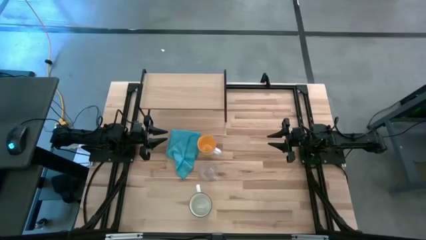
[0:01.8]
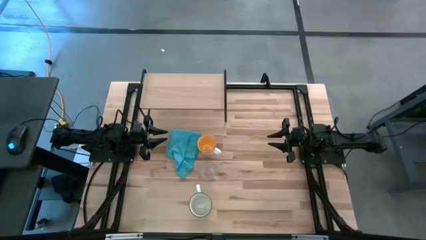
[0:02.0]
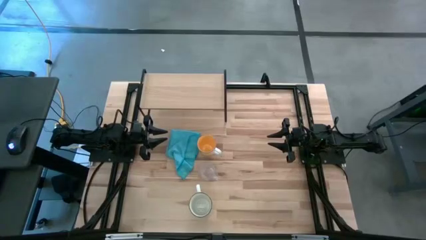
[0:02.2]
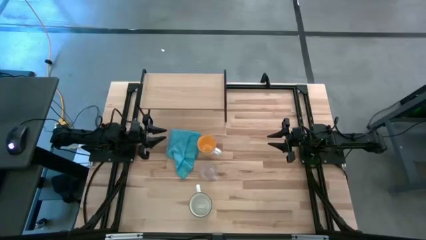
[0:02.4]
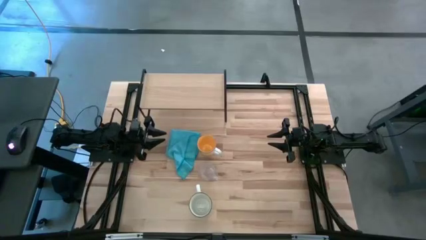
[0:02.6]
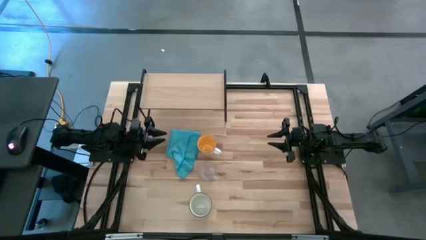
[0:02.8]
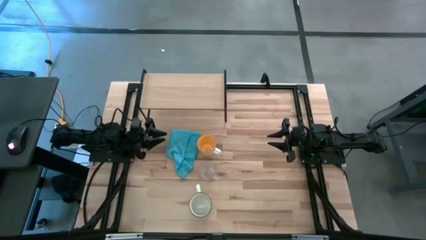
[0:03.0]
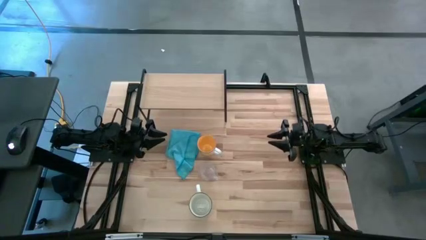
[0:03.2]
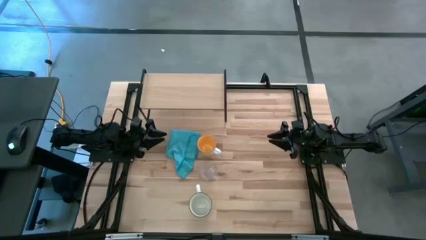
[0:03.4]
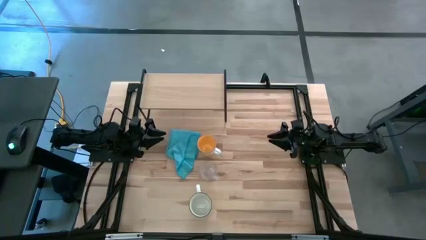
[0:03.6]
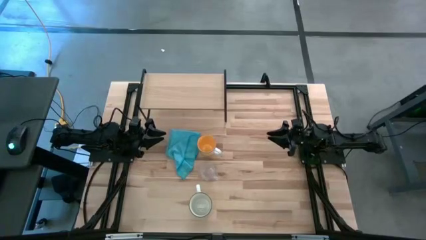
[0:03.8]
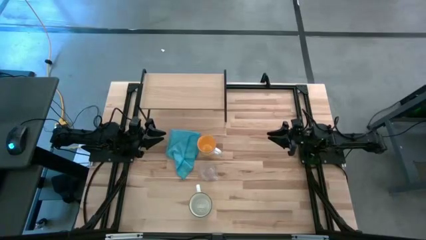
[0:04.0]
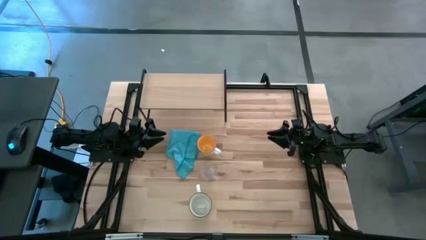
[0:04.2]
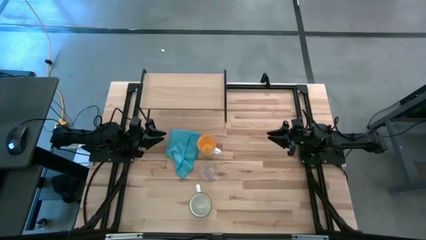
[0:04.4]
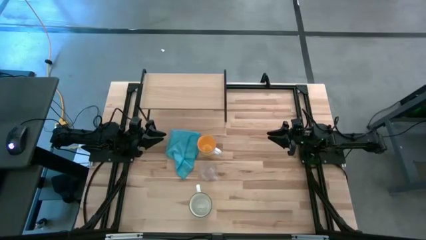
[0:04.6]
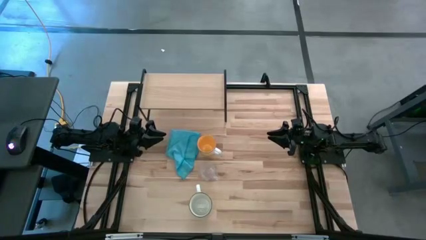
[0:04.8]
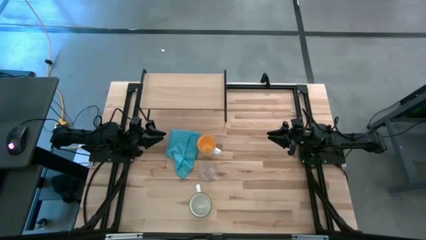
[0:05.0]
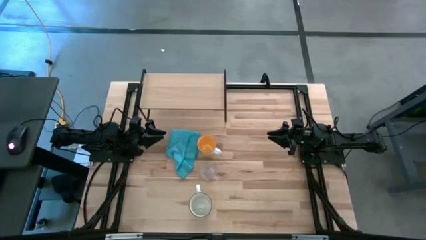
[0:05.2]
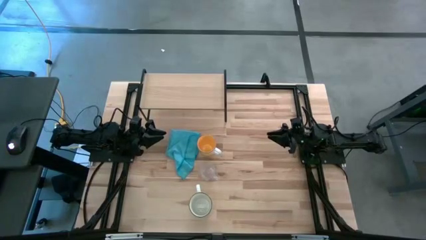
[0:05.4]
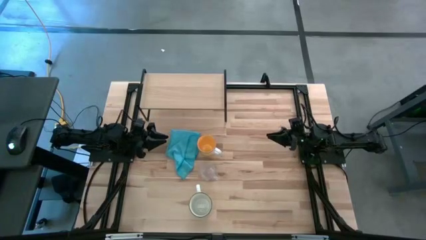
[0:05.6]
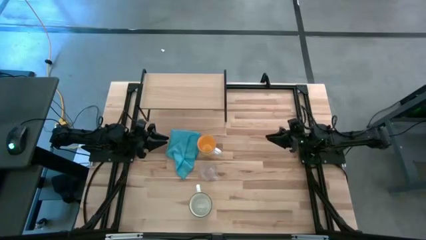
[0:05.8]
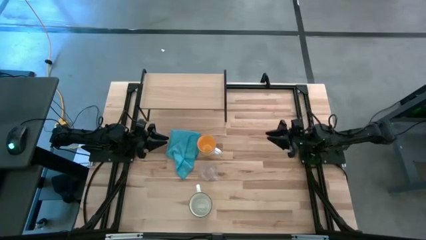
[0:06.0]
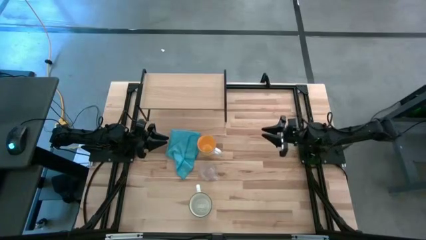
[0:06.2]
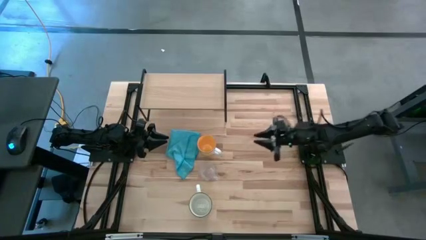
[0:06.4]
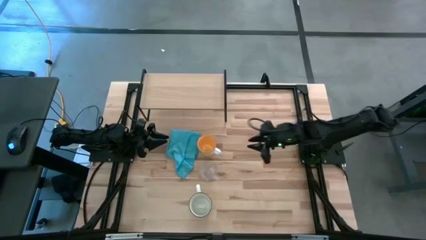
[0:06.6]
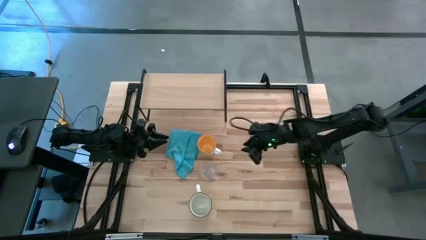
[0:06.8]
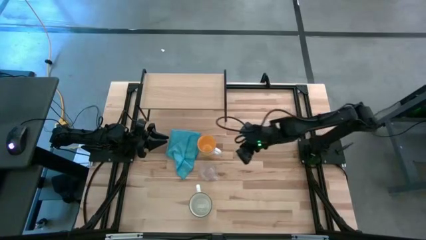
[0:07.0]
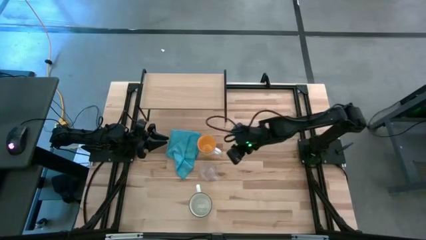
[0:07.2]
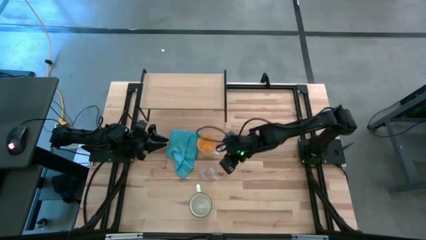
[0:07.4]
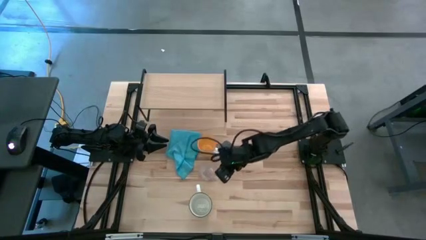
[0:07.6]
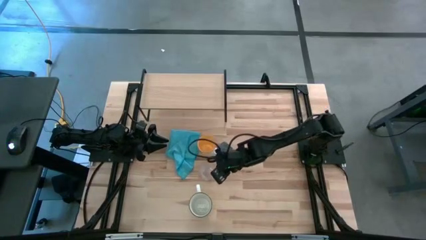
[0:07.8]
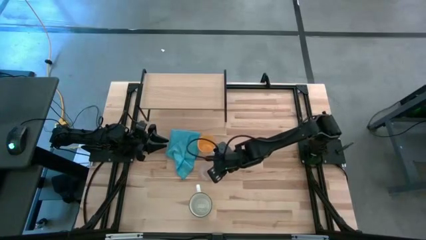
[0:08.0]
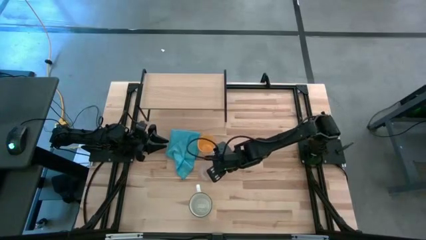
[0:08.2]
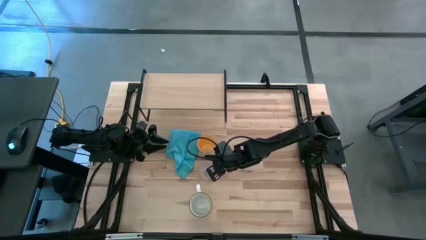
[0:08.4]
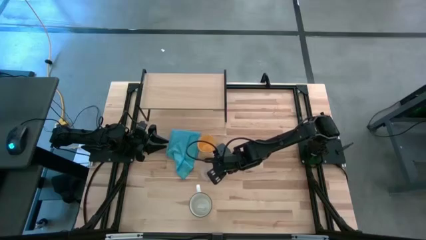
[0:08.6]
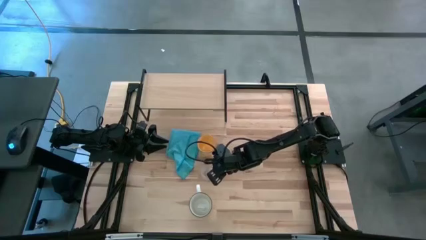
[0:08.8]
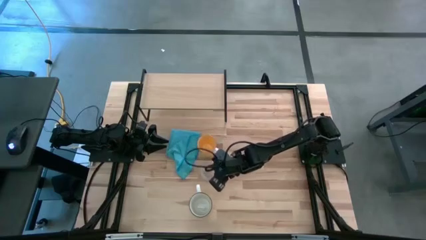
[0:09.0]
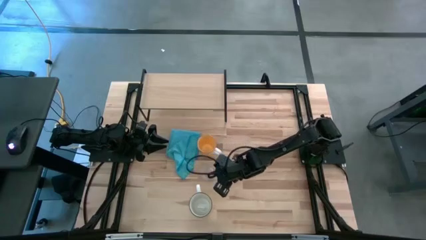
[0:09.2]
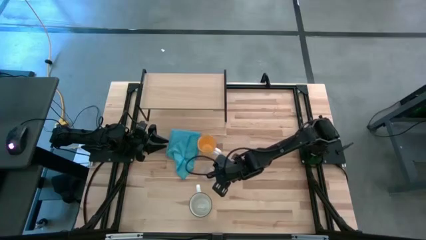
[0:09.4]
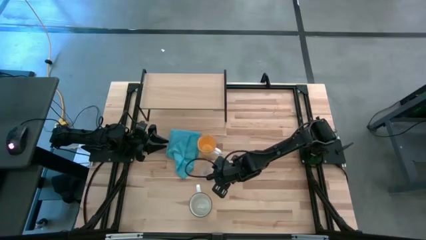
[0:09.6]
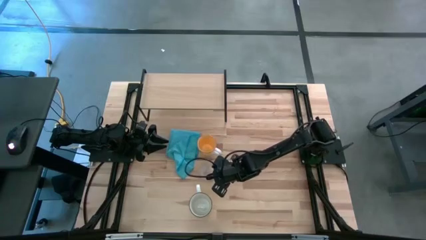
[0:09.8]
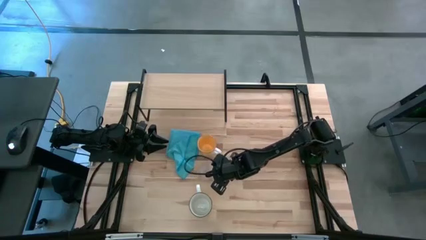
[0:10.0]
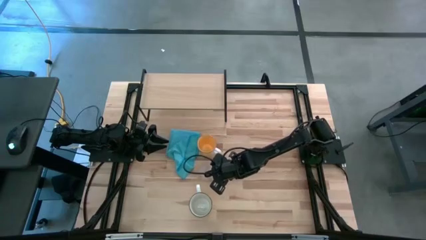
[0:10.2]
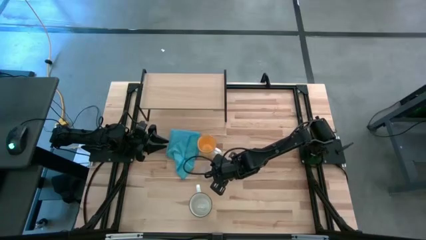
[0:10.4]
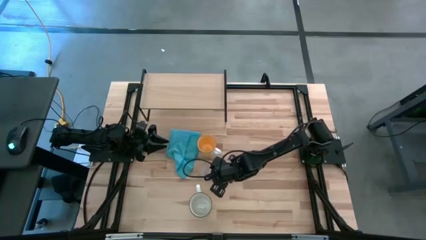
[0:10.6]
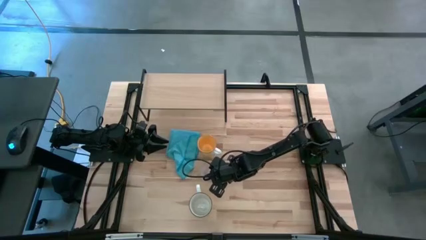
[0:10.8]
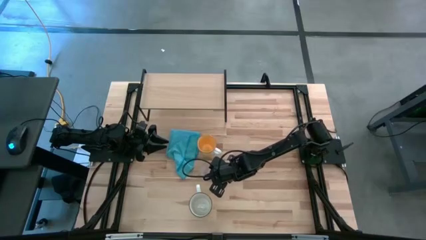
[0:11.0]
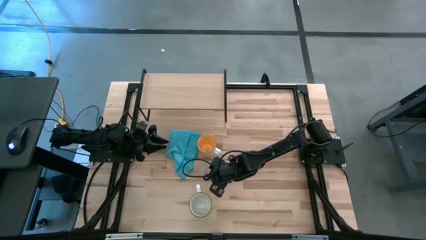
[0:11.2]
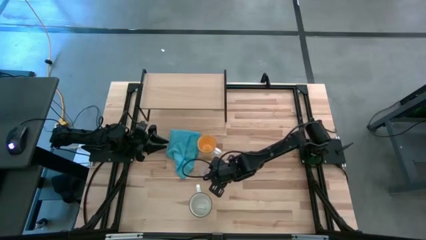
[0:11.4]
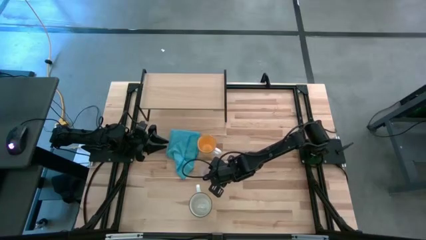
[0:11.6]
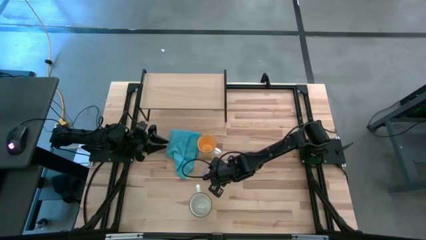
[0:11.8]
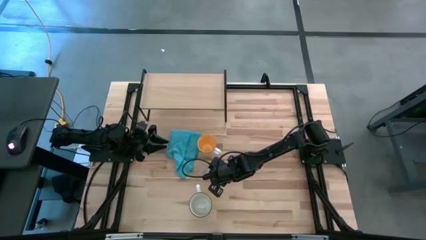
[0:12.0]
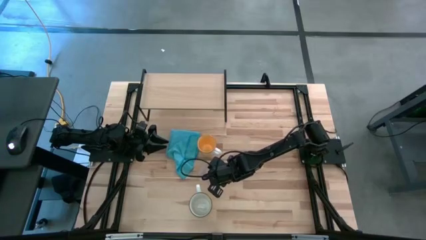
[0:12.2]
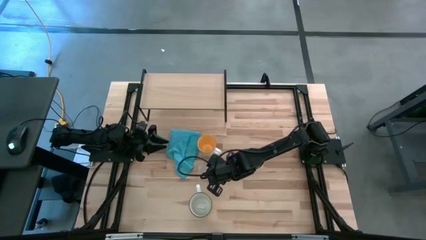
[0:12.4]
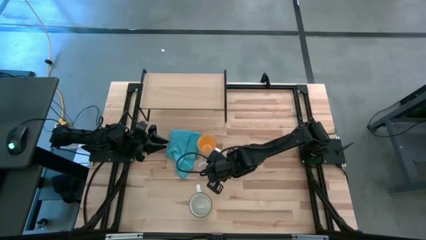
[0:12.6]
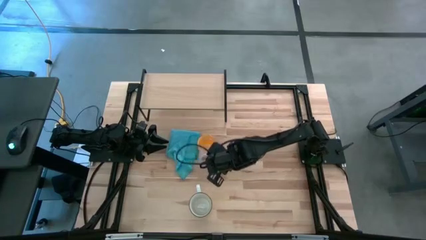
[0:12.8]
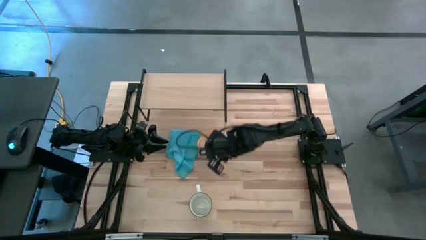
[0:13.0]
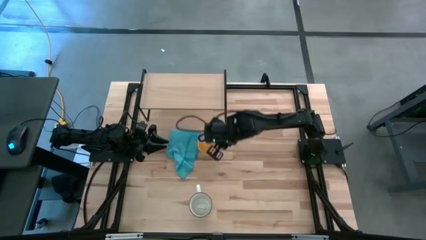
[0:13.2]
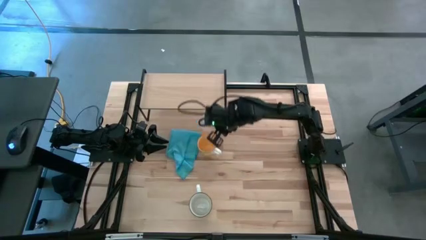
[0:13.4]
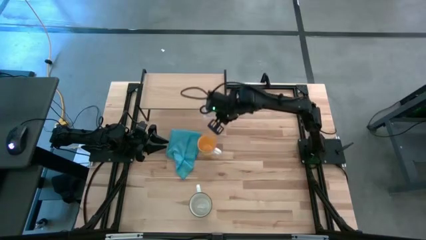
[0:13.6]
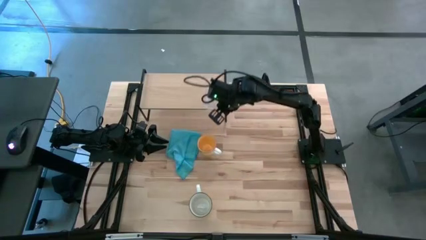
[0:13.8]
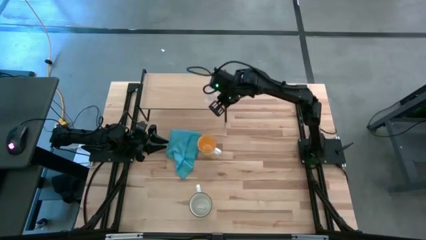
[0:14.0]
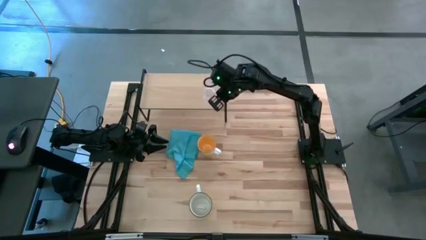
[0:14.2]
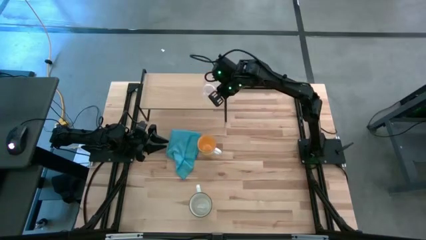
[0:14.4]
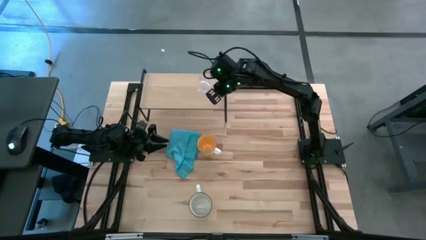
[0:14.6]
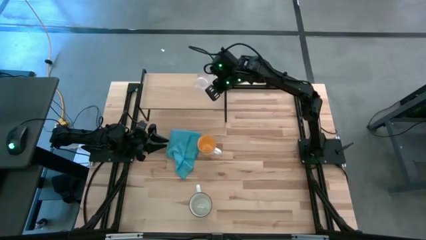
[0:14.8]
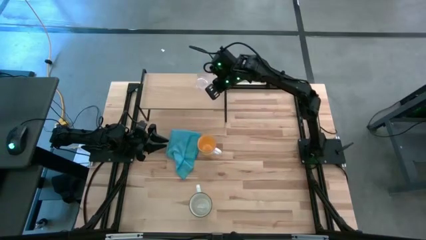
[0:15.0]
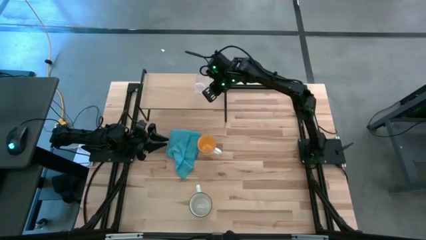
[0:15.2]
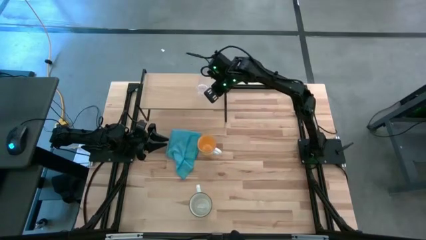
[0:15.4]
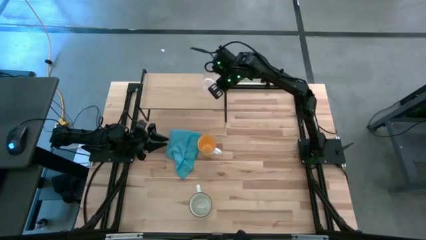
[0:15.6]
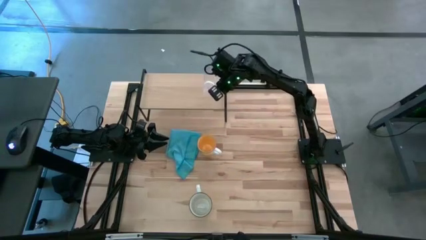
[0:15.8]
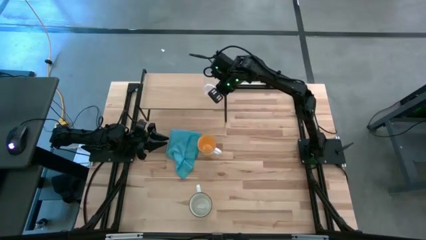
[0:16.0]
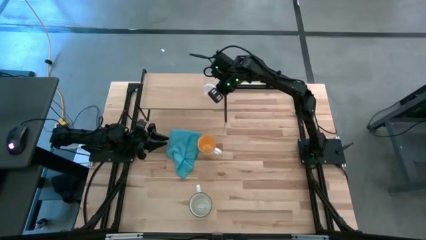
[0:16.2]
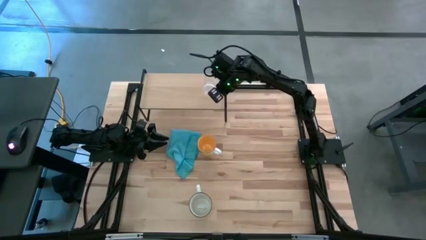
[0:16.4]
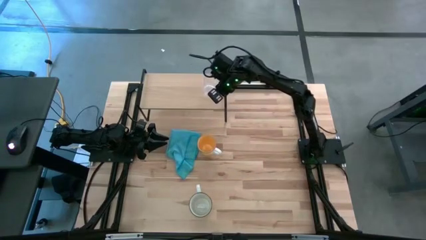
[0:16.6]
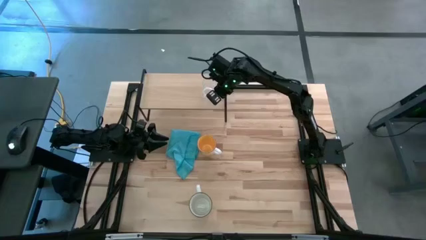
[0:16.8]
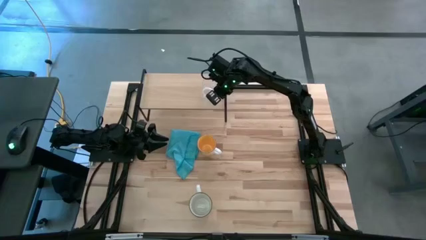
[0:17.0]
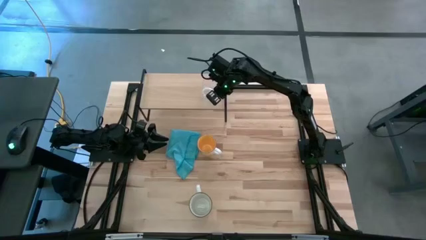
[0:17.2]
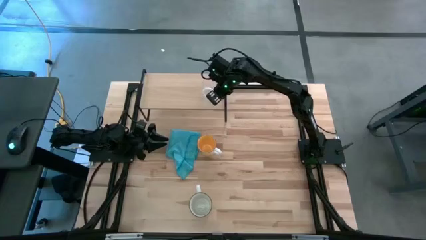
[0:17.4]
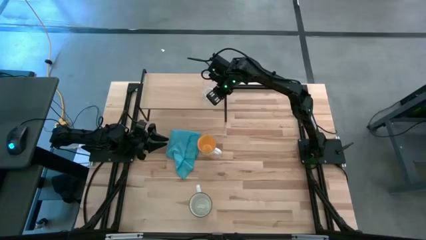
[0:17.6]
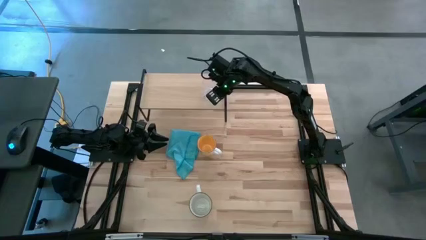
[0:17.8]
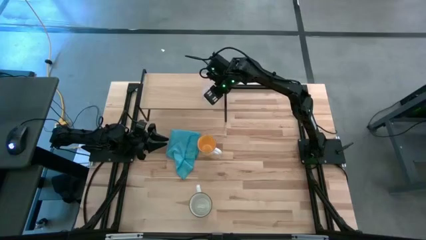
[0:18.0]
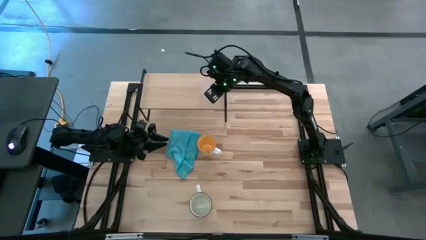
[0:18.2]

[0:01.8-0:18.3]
Task: Stack small to large cups/mugs on shelf
Put the transparent mug on the shelf
